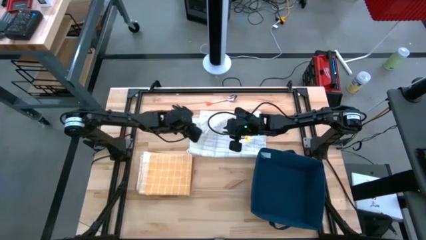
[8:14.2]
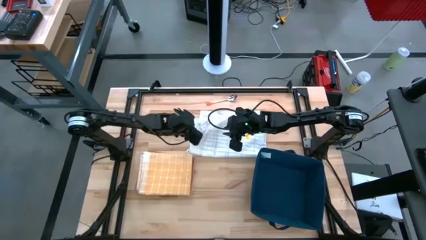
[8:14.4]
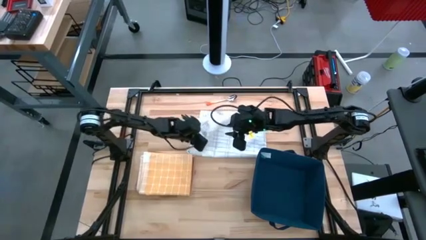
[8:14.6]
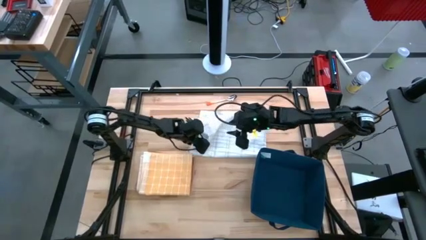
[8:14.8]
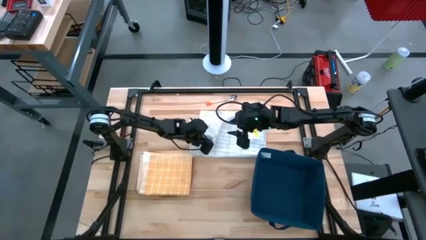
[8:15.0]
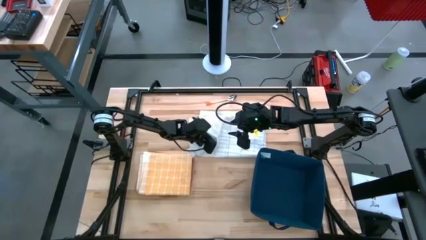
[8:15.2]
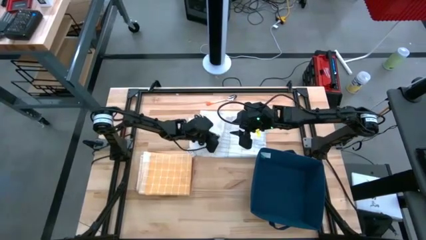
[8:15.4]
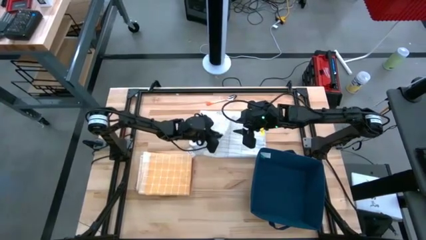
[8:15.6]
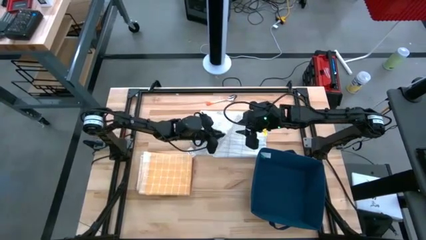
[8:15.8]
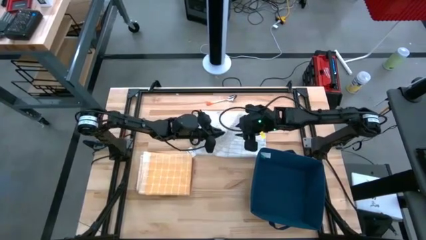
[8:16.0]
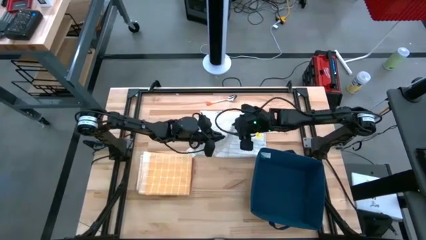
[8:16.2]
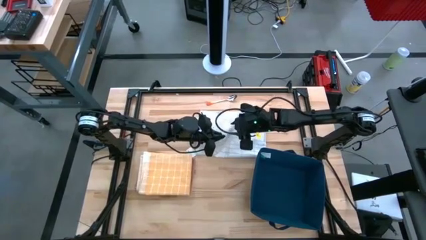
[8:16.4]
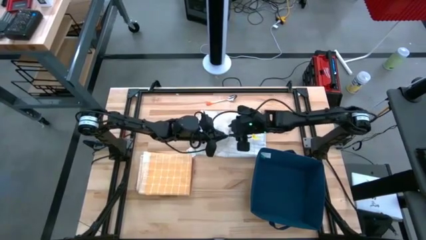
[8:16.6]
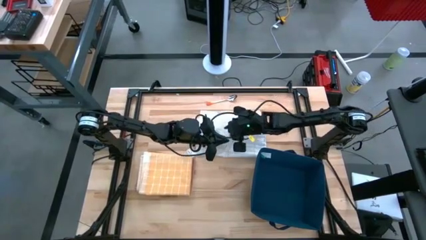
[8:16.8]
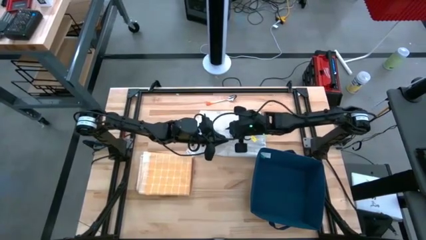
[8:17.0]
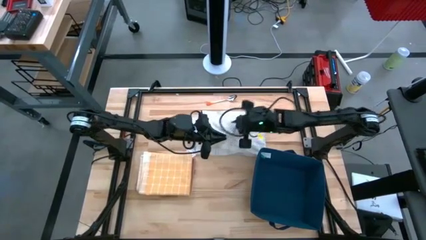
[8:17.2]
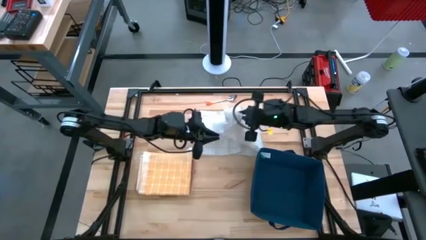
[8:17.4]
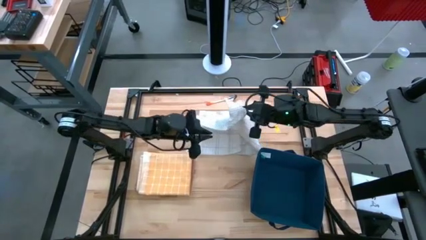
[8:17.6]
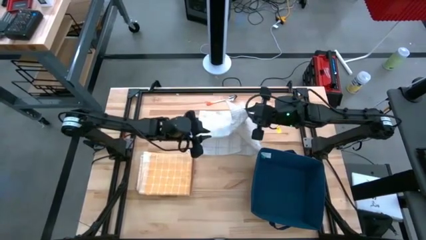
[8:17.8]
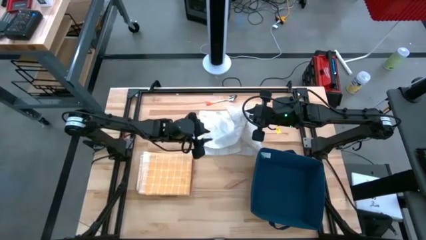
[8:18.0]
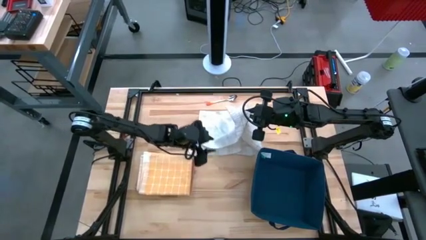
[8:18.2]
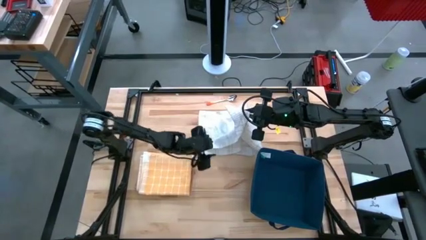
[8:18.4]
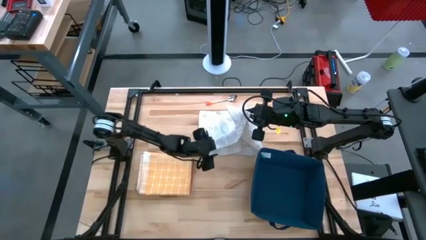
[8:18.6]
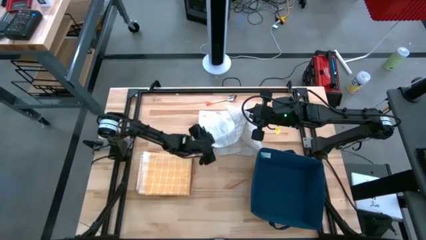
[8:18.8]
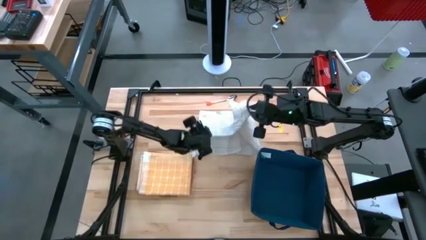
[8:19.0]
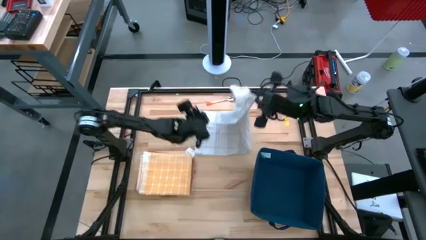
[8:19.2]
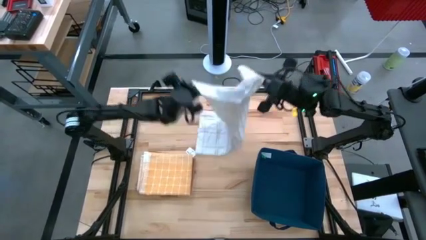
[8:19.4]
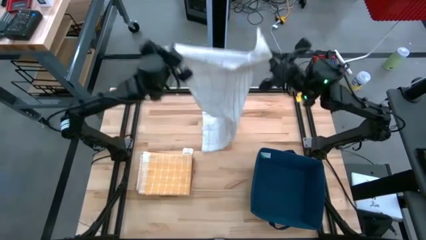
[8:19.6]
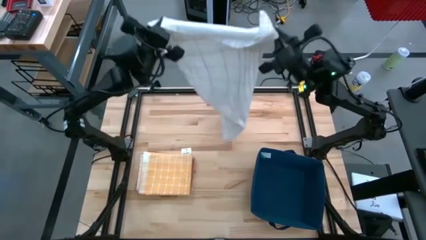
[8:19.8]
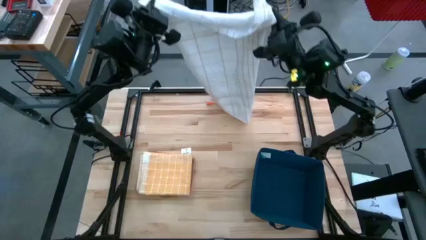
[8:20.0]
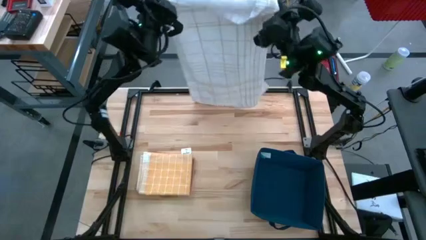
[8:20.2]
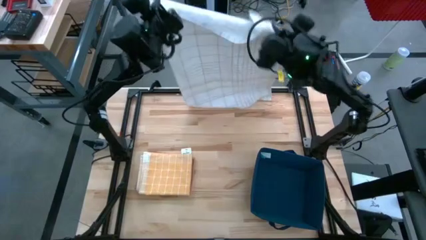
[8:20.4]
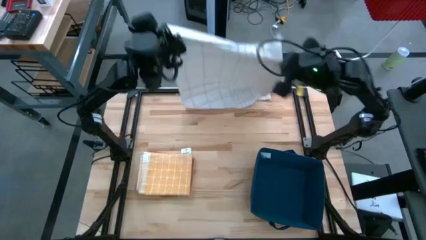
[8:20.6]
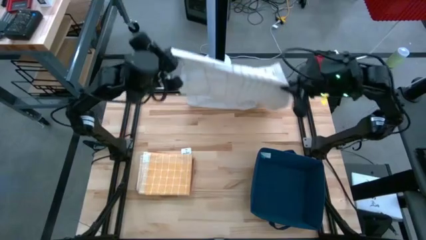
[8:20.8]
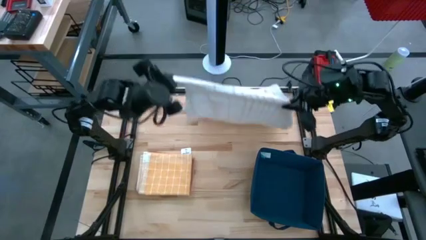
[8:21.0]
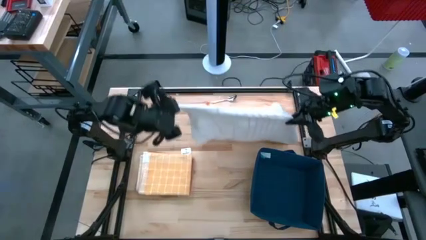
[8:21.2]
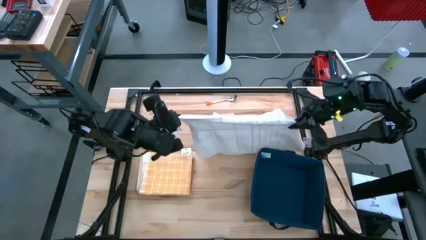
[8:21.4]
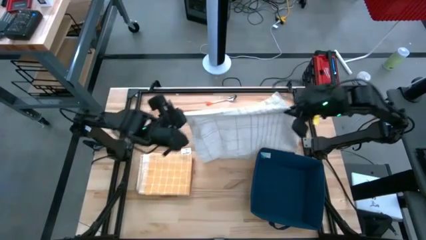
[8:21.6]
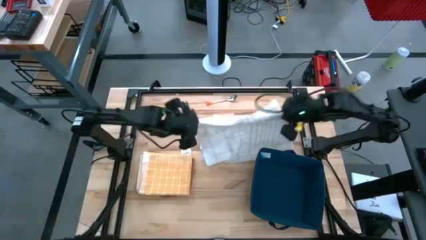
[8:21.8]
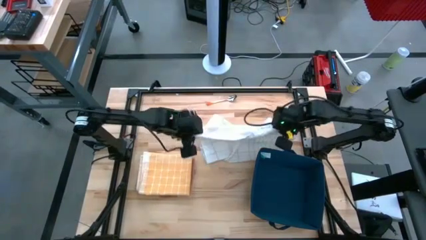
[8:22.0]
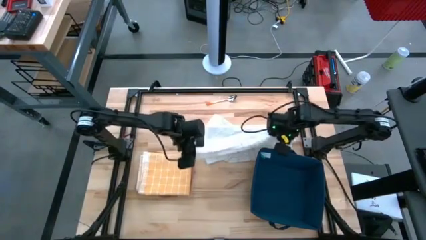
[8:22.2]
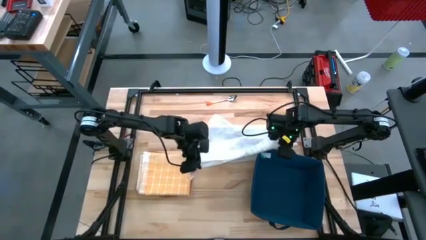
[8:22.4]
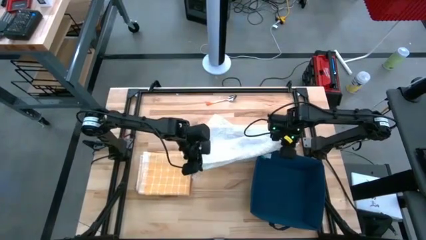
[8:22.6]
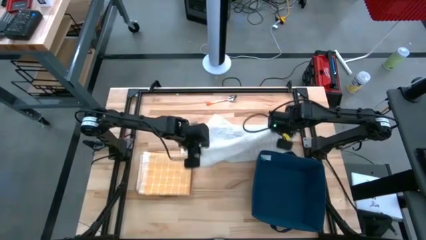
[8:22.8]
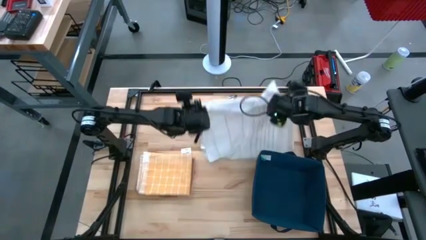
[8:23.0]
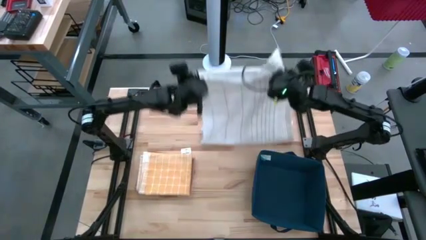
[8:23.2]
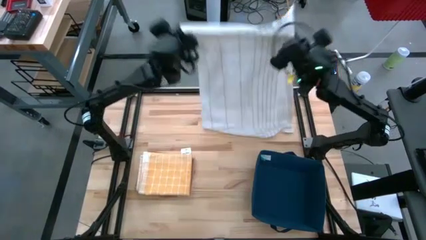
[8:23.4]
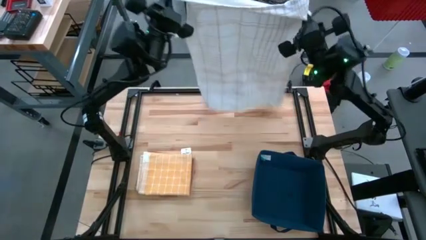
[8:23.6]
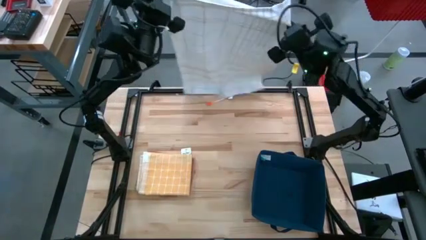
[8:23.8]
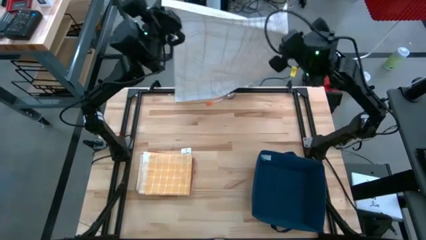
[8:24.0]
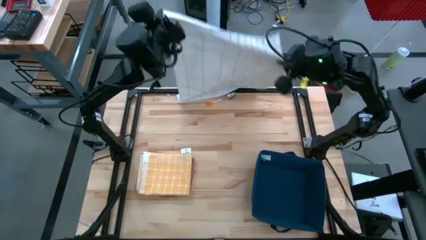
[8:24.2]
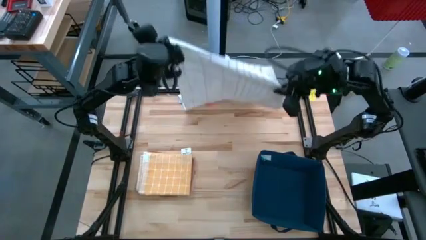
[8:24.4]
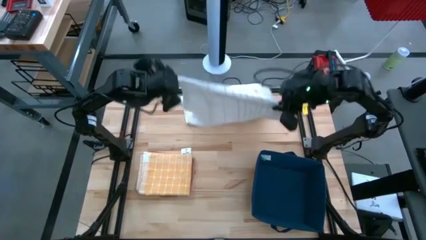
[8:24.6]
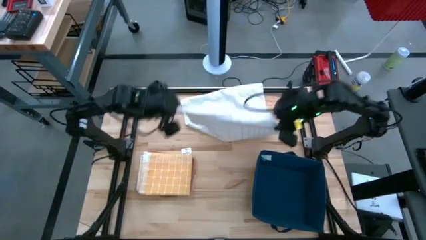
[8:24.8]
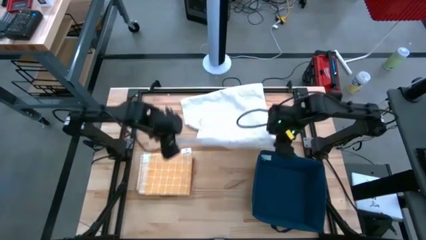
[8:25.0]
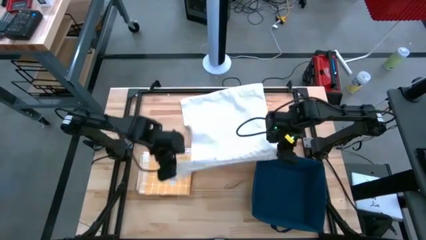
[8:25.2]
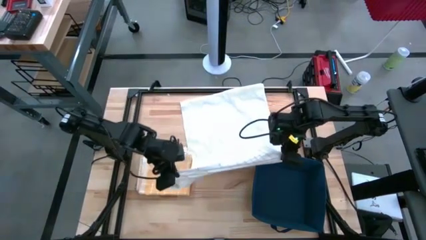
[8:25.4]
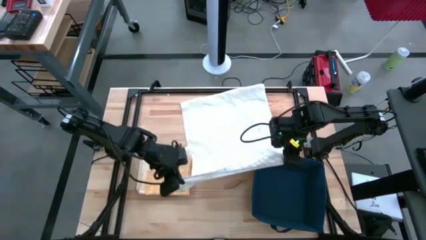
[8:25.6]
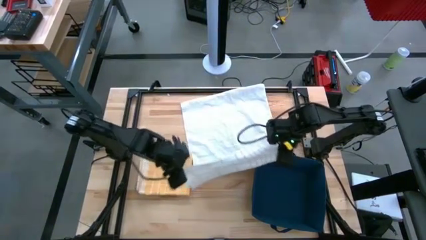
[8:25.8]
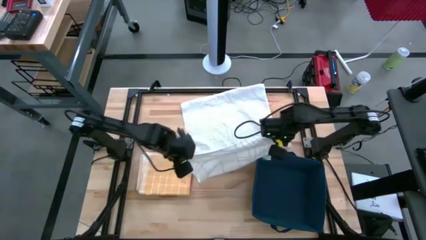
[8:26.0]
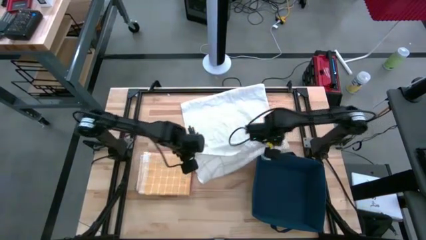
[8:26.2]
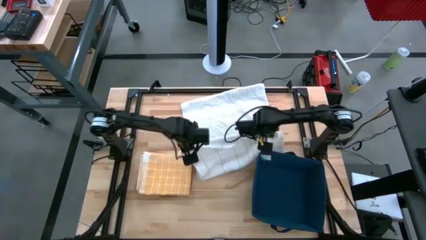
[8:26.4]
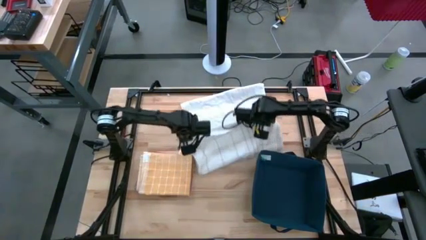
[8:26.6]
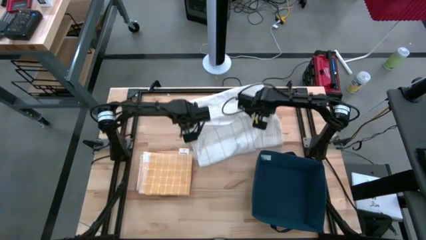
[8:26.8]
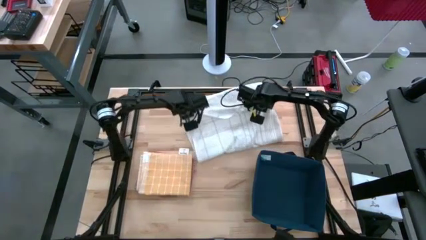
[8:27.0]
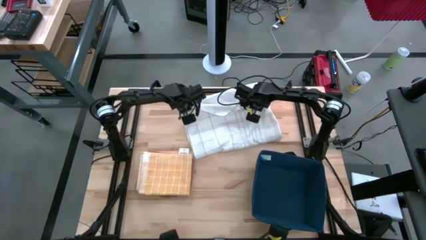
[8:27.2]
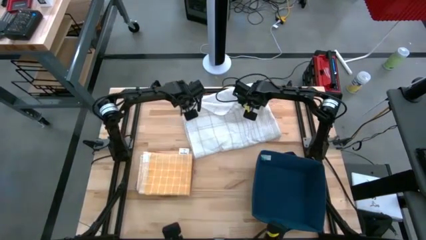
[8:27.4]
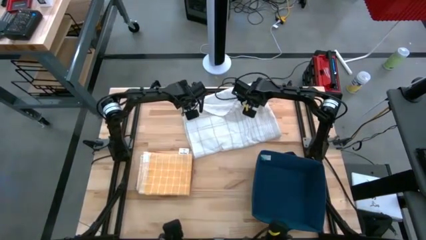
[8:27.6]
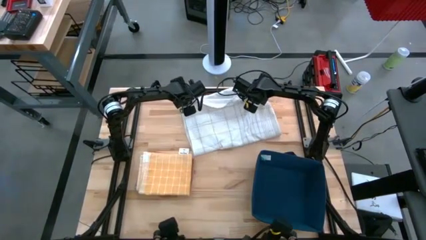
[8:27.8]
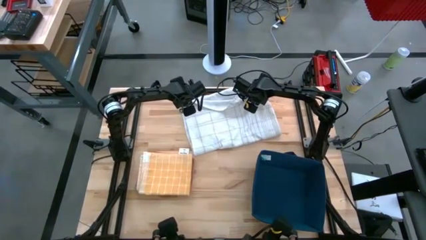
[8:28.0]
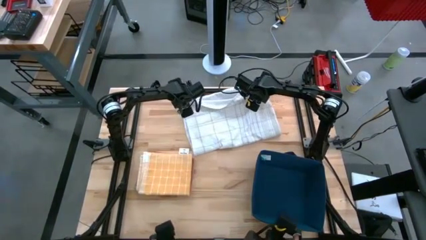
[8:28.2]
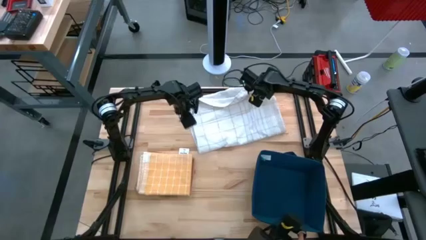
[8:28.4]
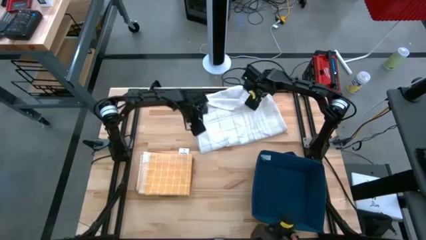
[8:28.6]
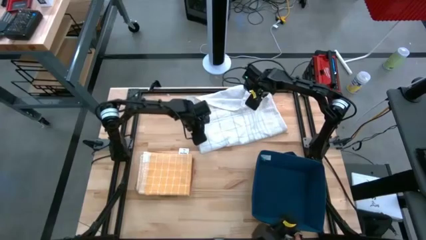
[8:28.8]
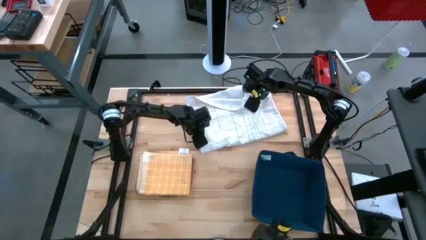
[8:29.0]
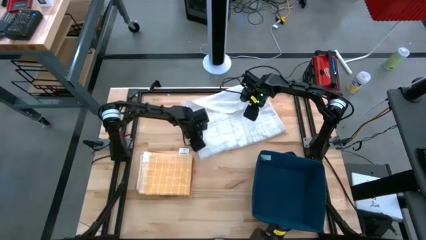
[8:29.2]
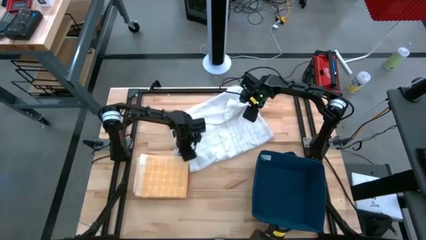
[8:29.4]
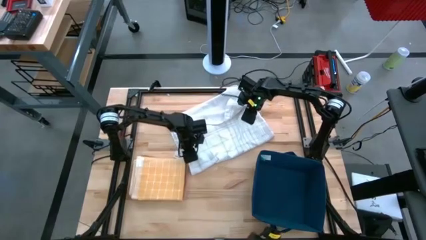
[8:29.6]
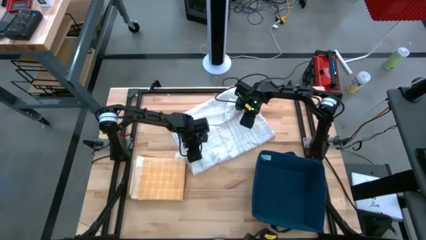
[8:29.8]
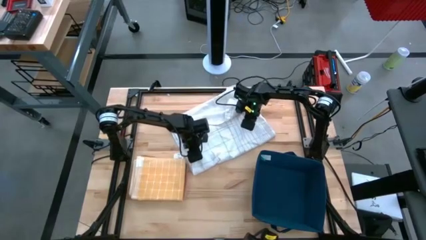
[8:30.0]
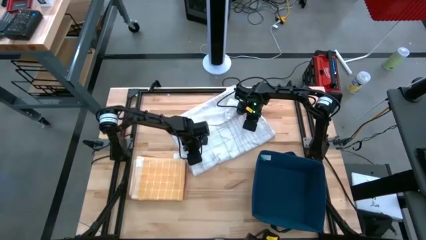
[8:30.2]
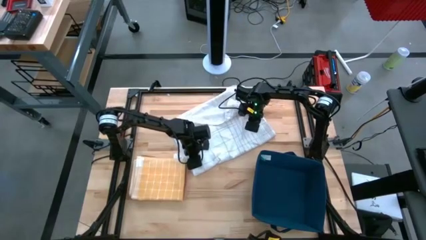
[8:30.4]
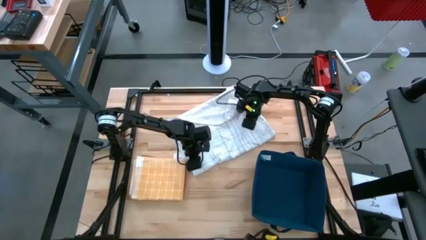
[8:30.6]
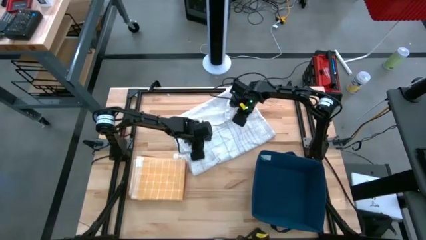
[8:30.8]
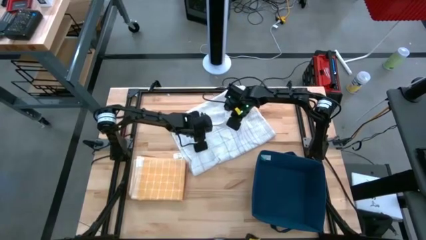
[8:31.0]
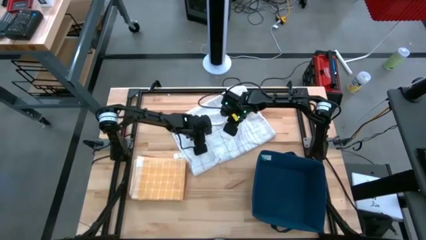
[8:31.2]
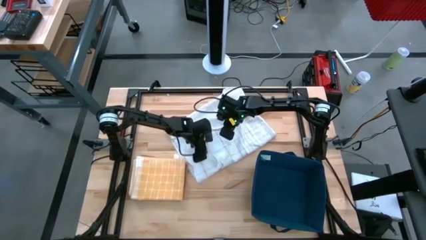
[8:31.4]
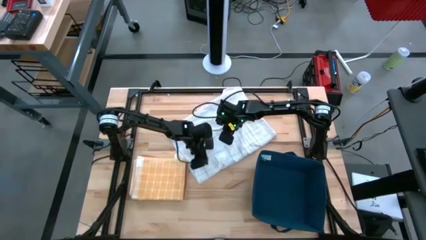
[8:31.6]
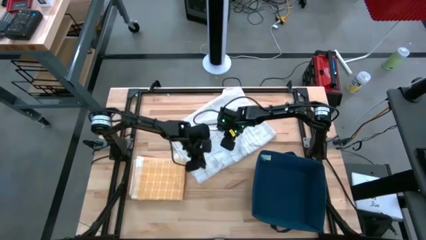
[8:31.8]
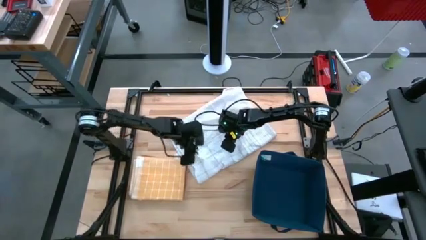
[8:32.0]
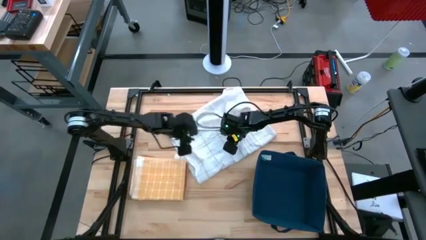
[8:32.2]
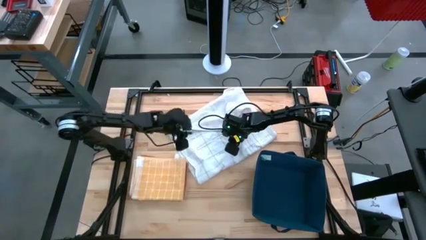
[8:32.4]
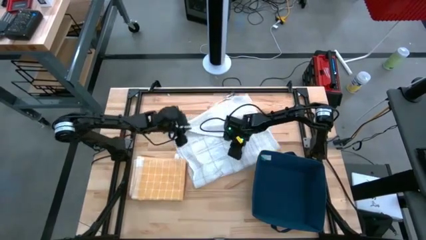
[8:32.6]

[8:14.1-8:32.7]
Task: Fold towel
Fold the white towel
